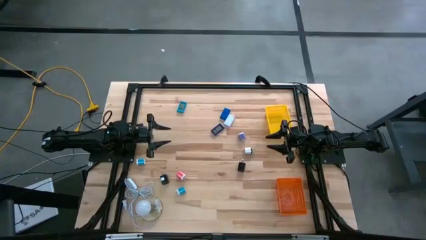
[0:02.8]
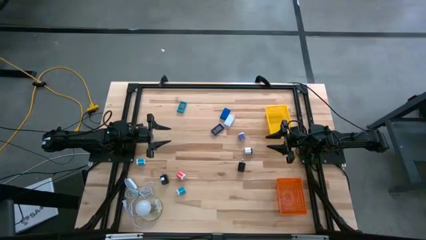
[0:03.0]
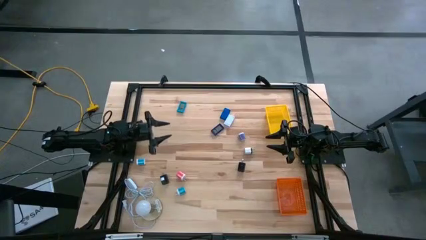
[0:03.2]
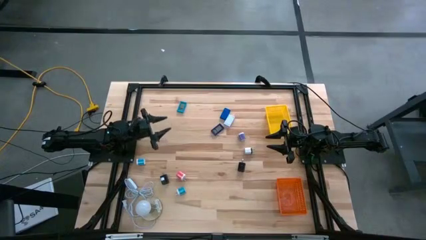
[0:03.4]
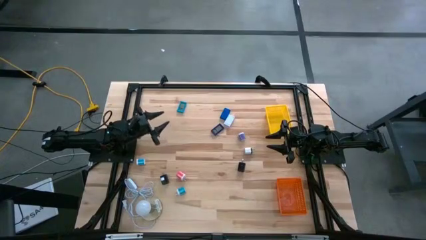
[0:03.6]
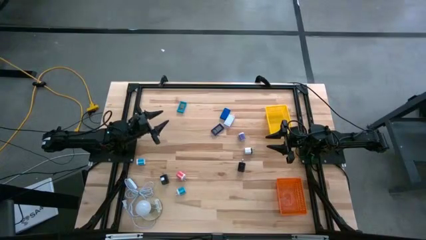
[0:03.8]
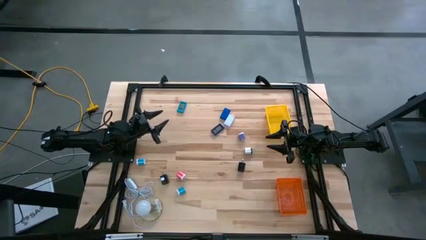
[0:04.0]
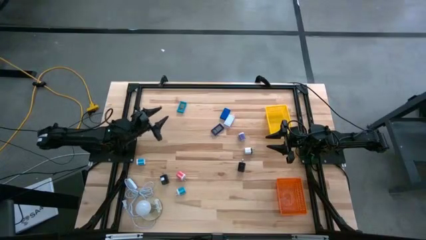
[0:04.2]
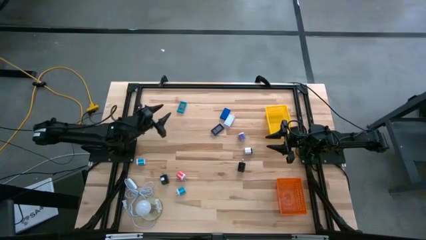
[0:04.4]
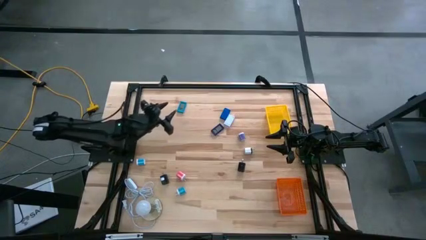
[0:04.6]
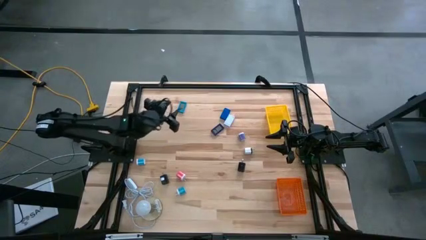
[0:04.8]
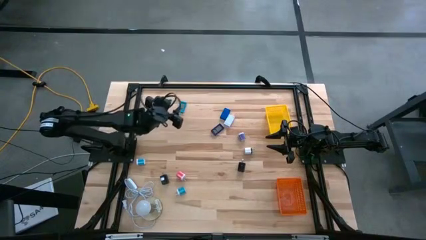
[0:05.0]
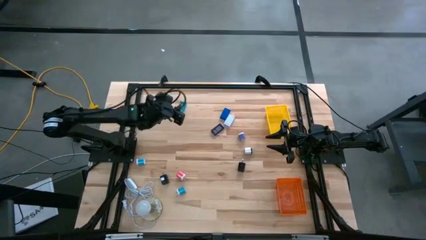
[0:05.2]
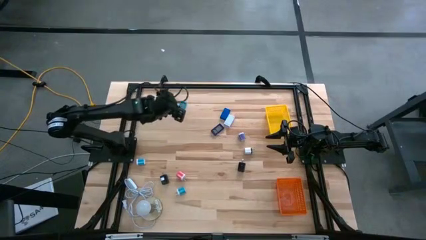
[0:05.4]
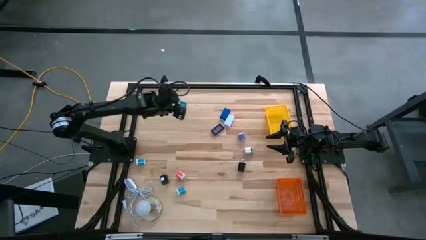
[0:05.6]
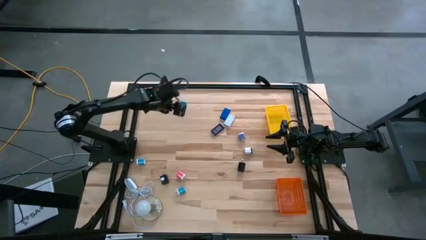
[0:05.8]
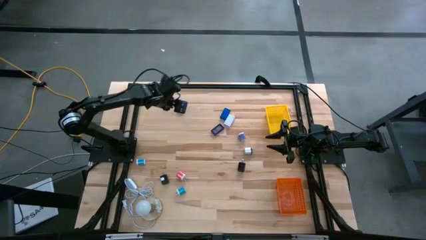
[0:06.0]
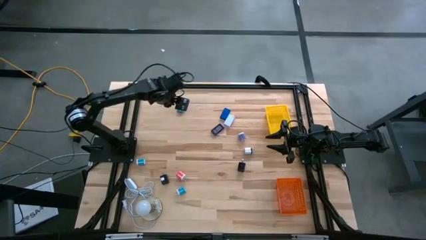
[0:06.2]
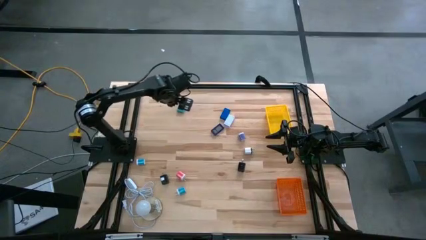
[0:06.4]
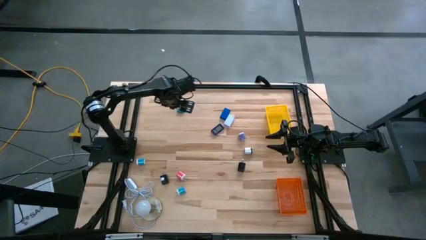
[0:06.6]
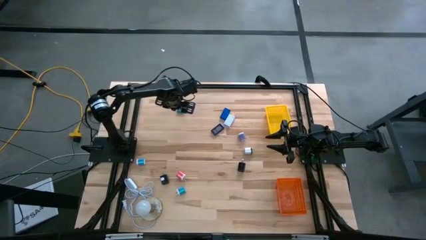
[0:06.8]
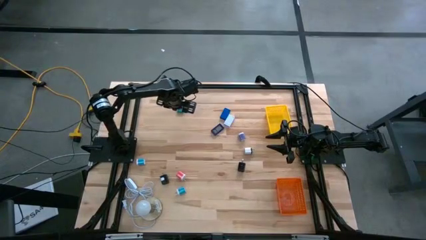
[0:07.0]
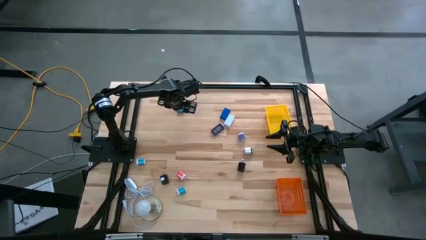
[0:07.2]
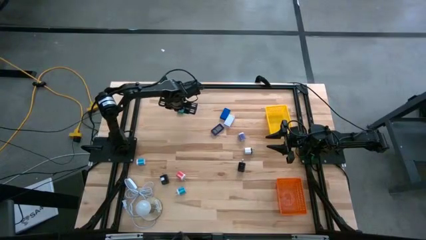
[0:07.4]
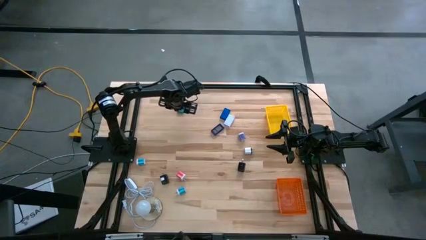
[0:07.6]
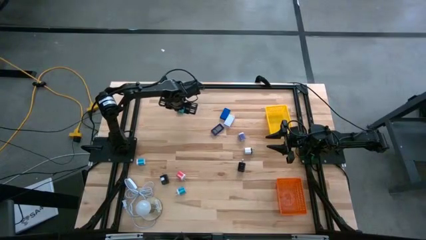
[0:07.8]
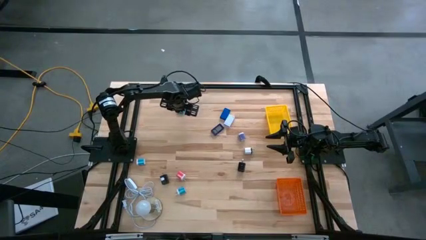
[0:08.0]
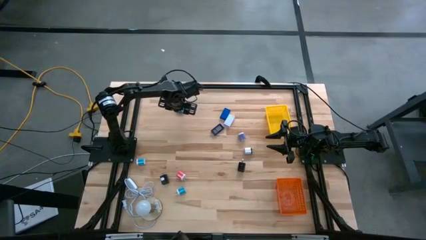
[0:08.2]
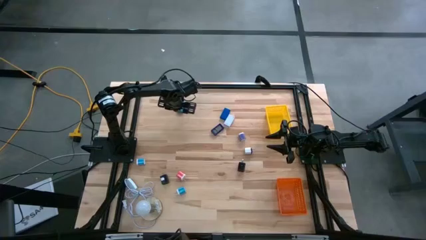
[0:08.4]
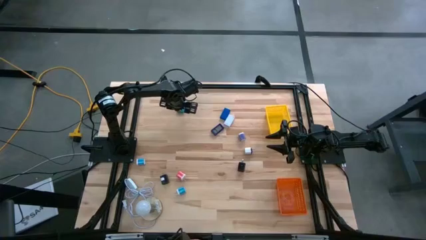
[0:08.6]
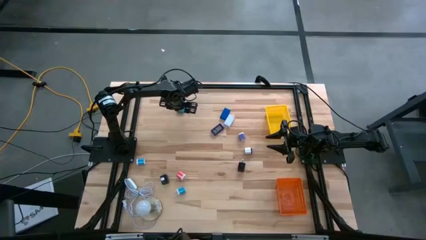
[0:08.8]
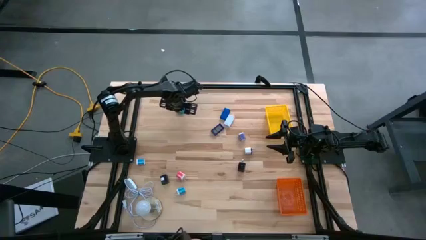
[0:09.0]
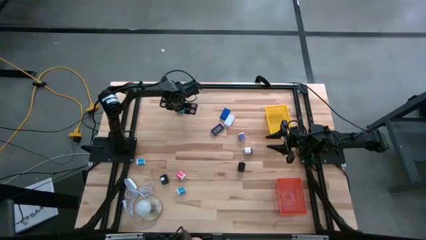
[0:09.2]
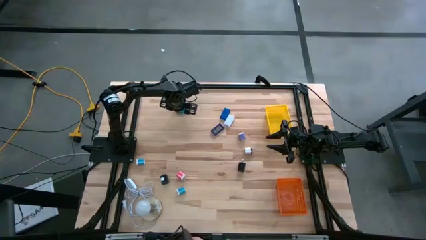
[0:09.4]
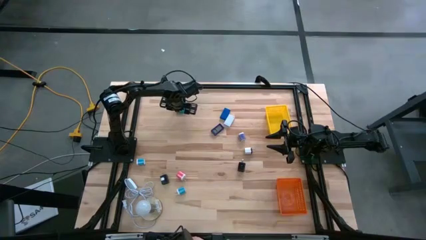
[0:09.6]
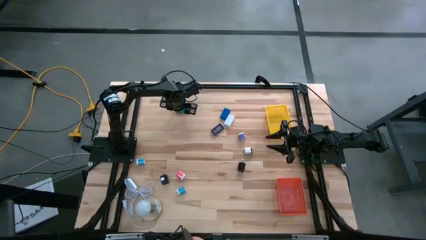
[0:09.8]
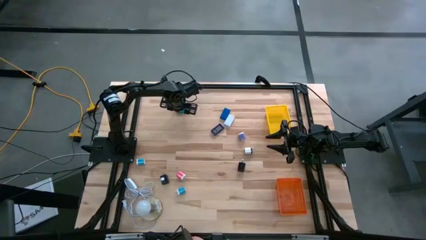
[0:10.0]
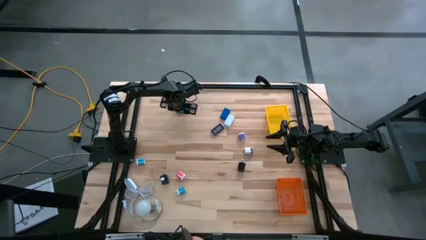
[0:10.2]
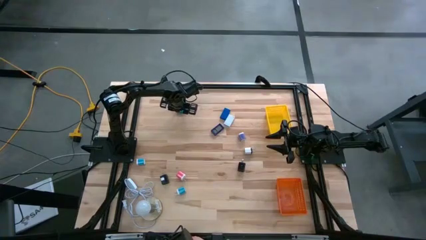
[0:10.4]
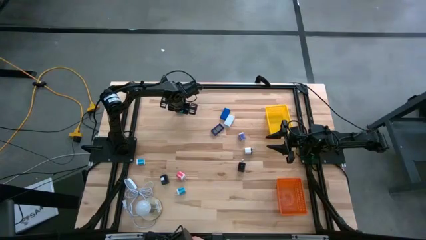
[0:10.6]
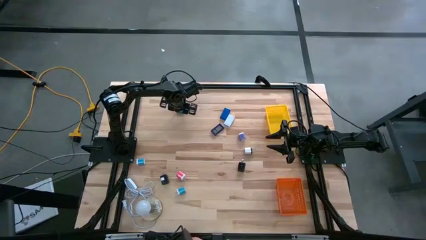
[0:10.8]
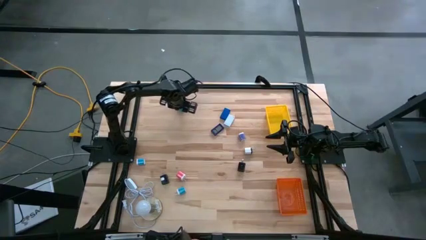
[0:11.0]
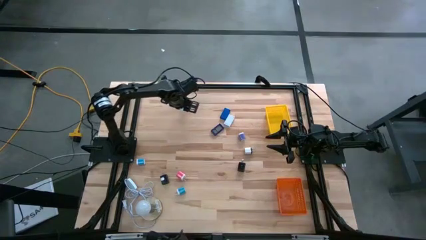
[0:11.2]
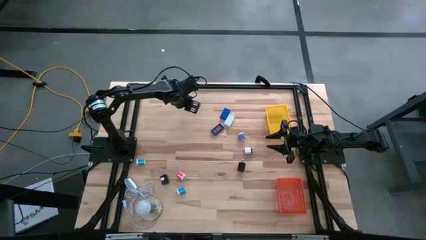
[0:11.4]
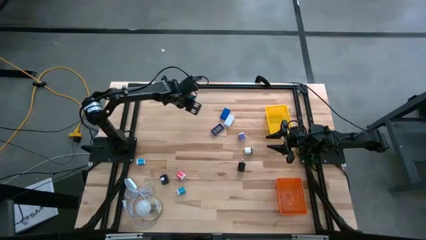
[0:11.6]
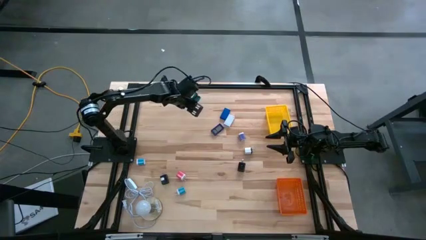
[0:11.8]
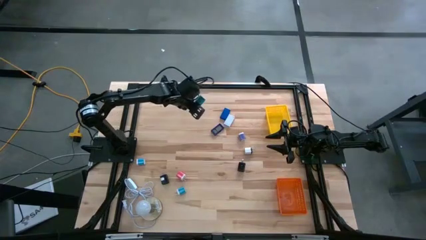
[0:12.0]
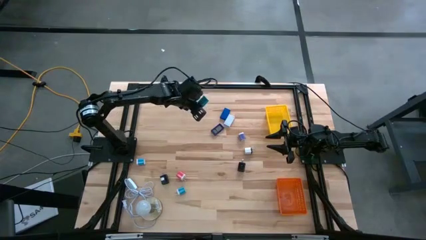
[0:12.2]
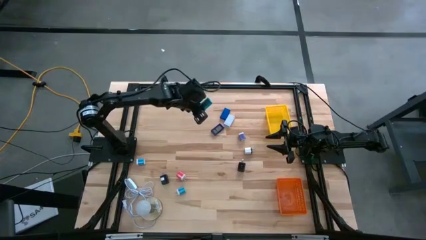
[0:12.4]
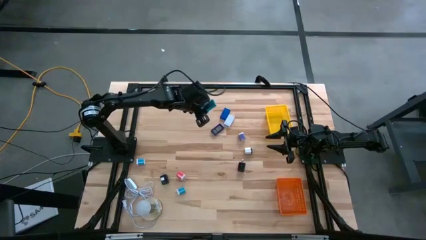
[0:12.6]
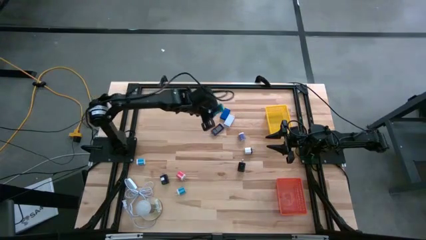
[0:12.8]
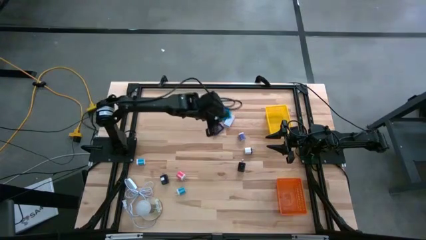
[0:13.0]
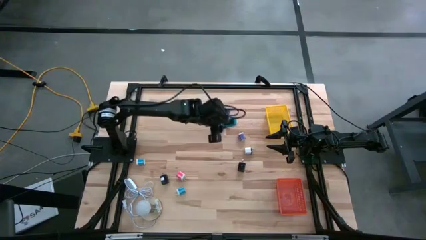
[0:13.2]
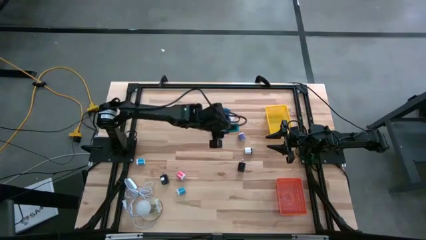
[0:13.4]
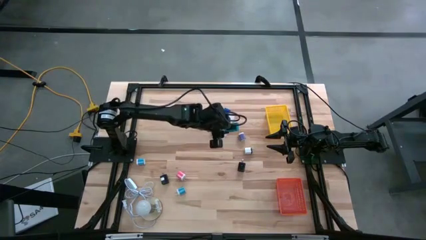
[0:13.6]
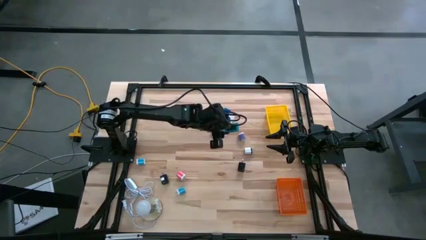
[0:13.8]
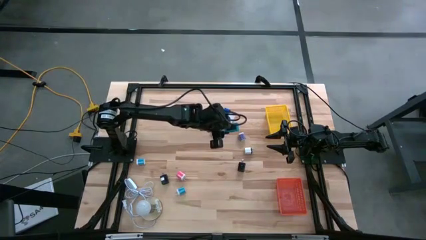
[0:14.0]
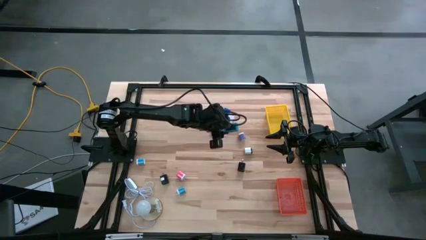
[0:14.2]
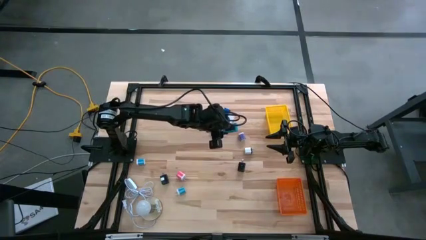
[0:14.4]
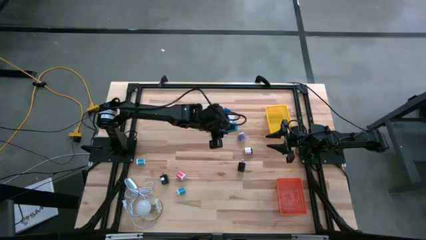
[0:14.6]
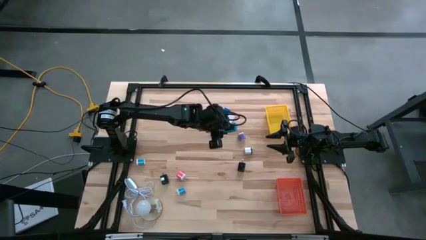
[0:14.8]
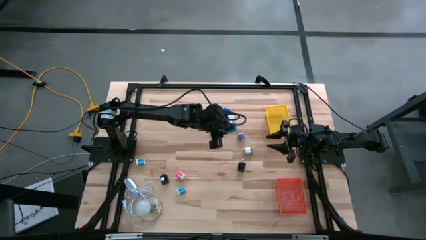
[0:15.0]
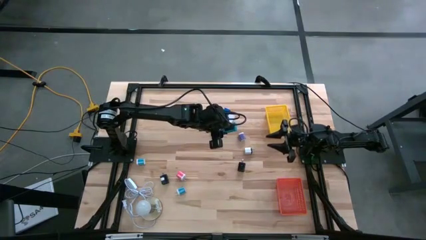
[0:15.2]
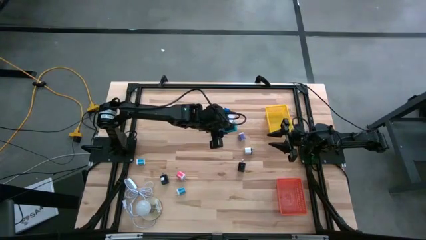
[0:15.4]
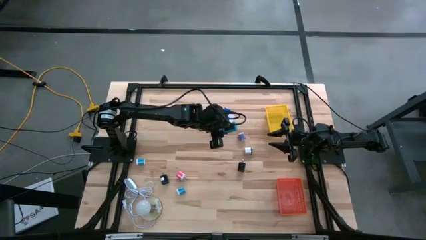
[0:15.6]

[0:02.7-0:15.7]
Task: Pick & Place Office items
Put the light blue digital clock into the yellow bin
